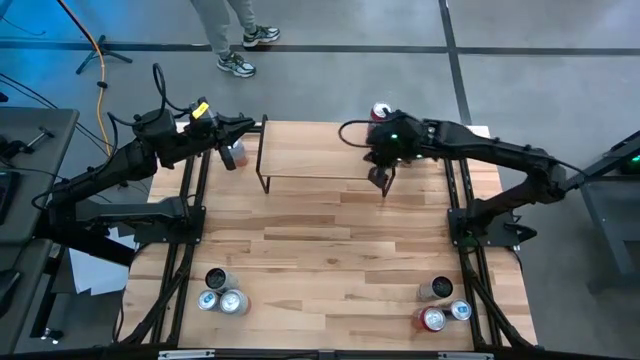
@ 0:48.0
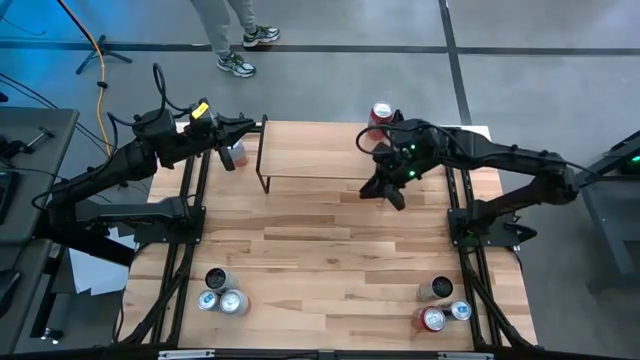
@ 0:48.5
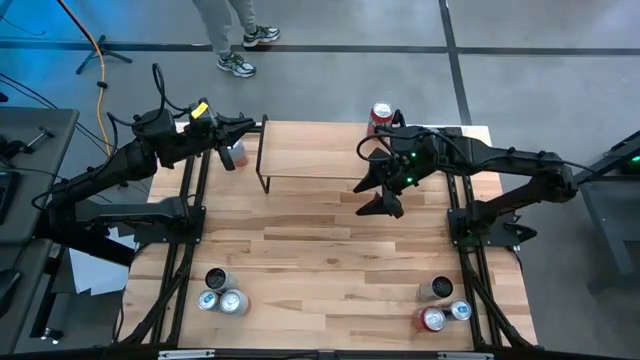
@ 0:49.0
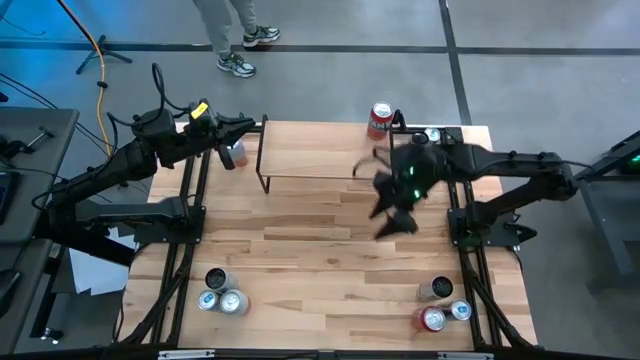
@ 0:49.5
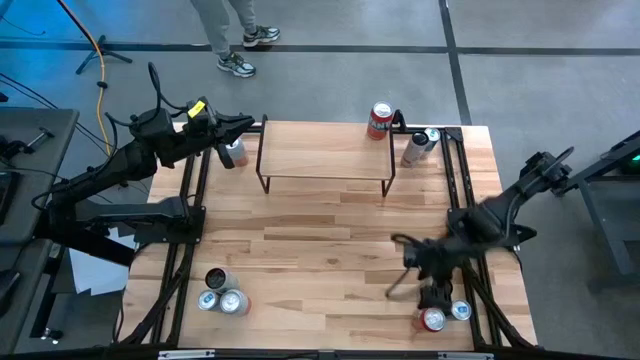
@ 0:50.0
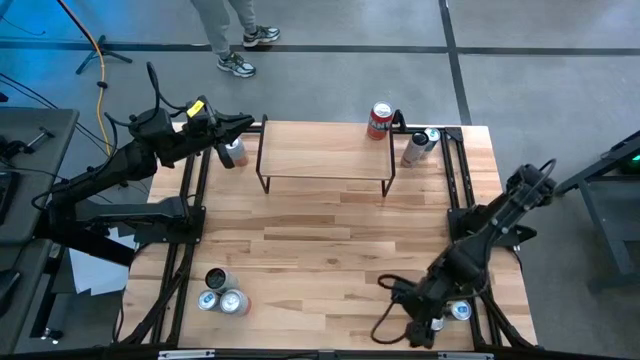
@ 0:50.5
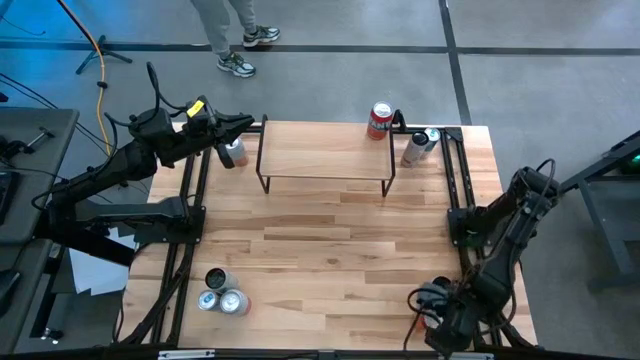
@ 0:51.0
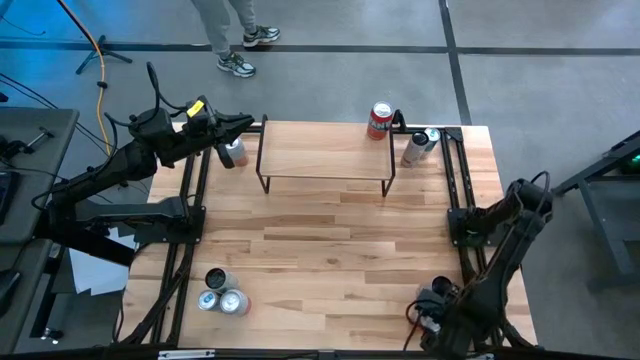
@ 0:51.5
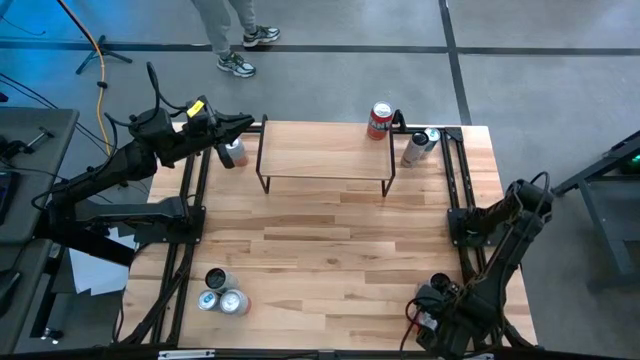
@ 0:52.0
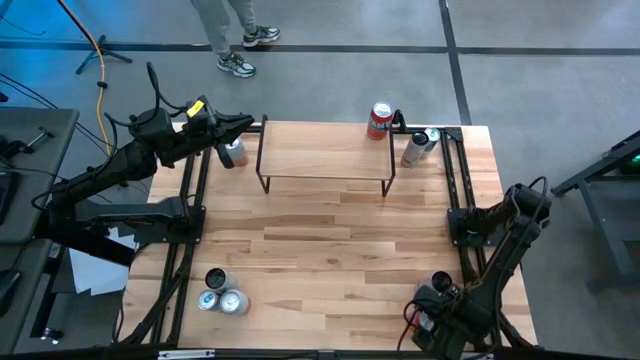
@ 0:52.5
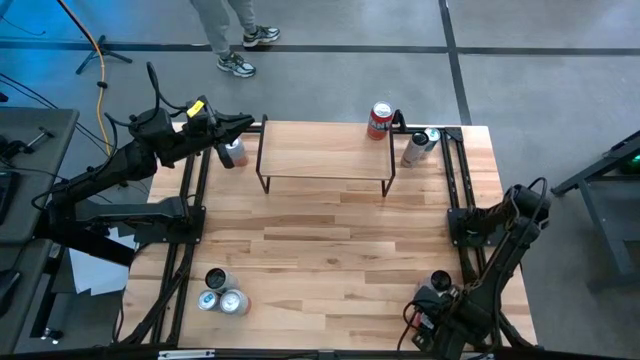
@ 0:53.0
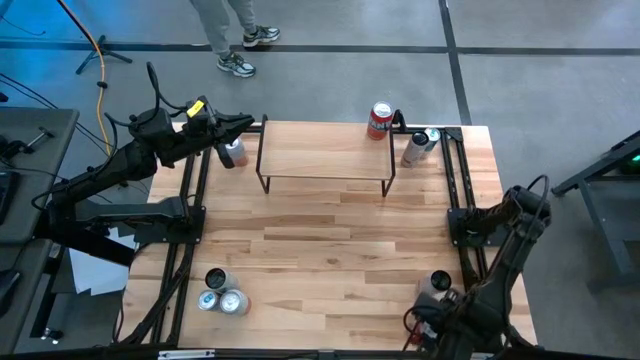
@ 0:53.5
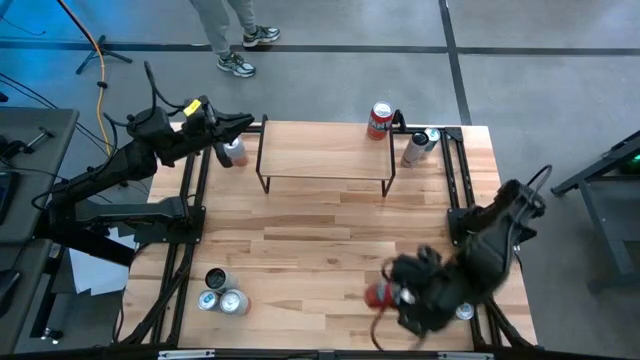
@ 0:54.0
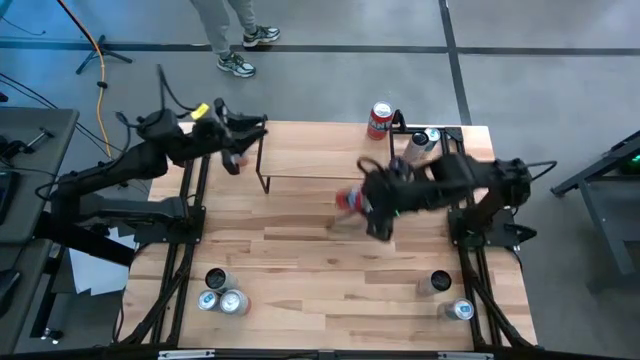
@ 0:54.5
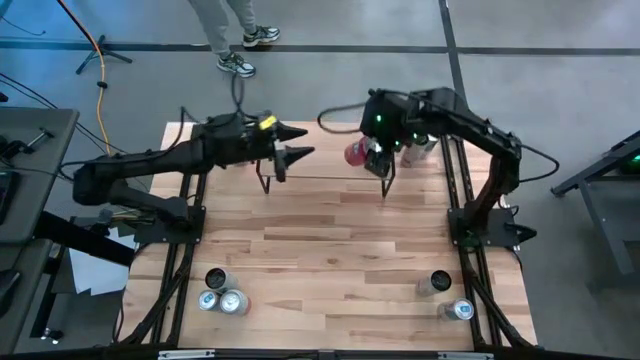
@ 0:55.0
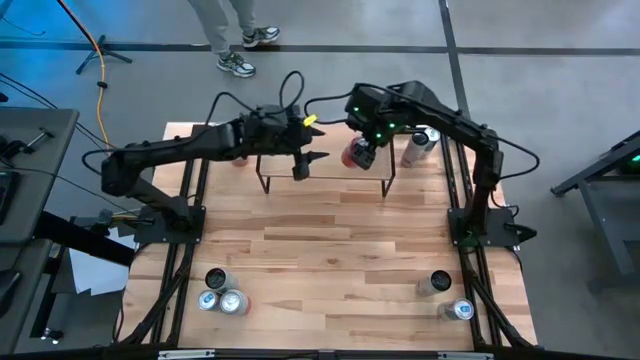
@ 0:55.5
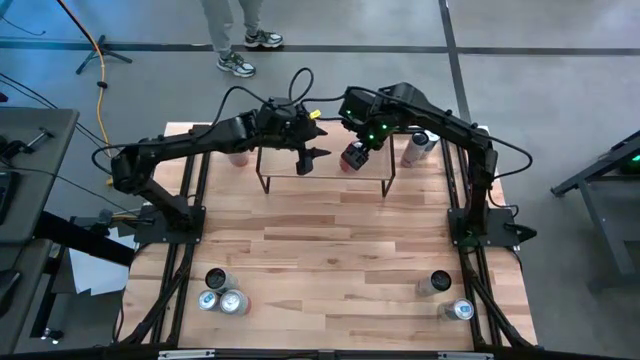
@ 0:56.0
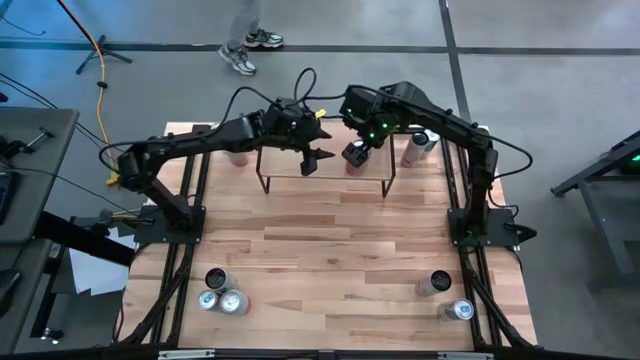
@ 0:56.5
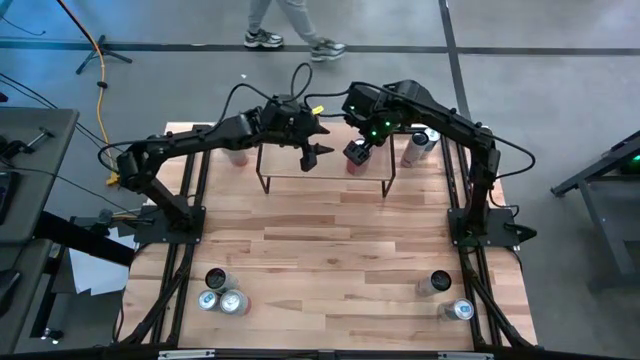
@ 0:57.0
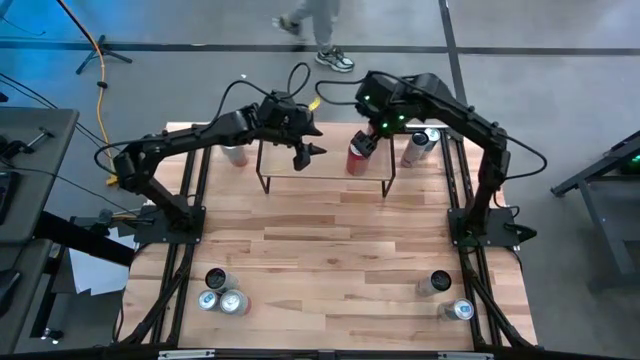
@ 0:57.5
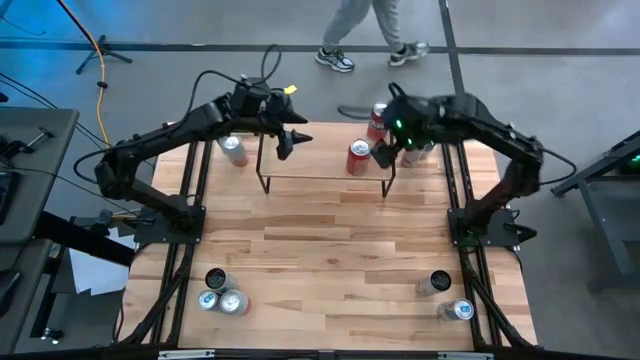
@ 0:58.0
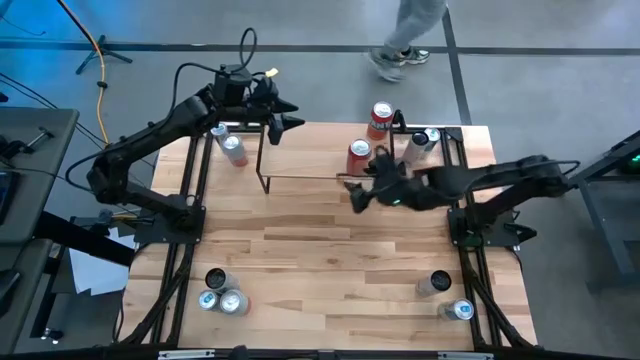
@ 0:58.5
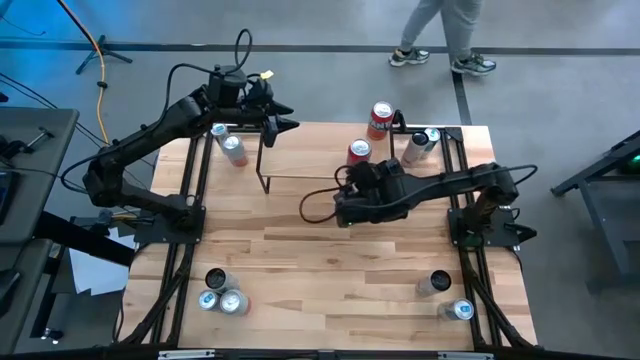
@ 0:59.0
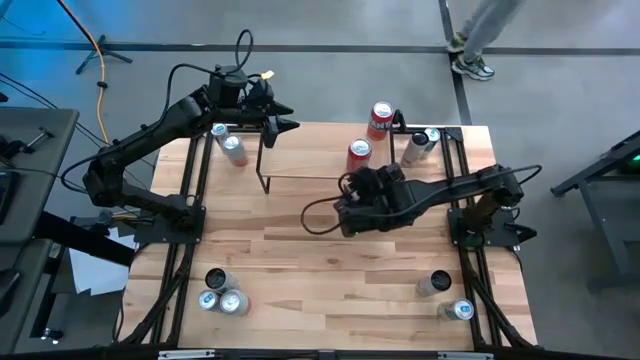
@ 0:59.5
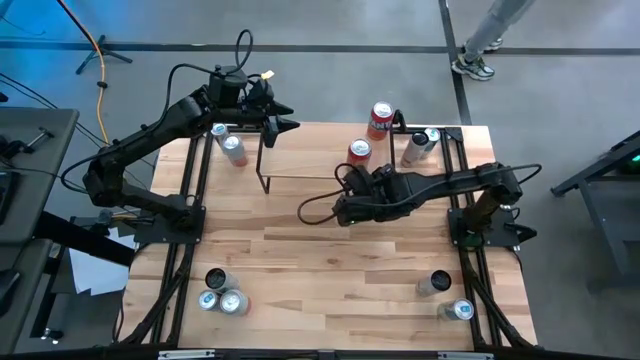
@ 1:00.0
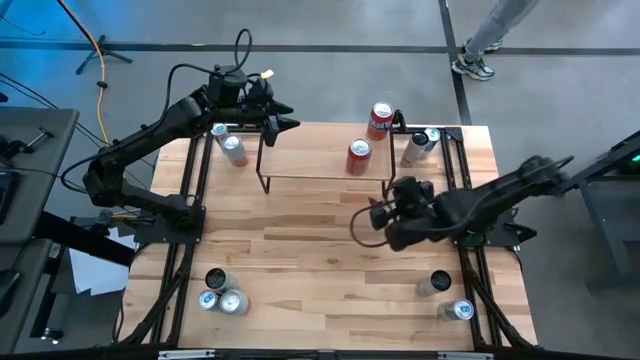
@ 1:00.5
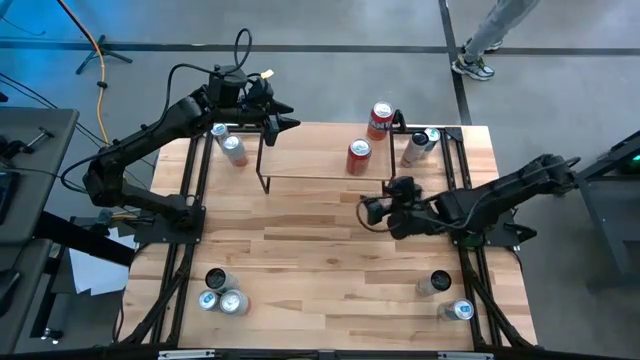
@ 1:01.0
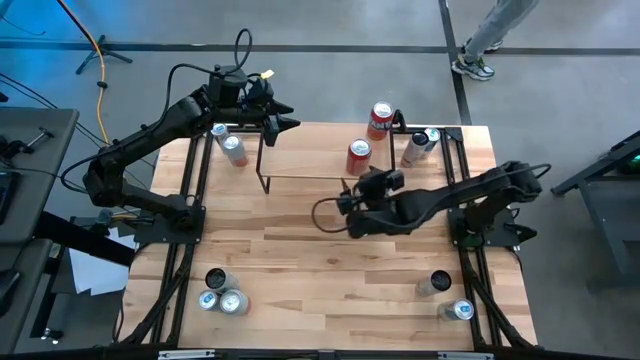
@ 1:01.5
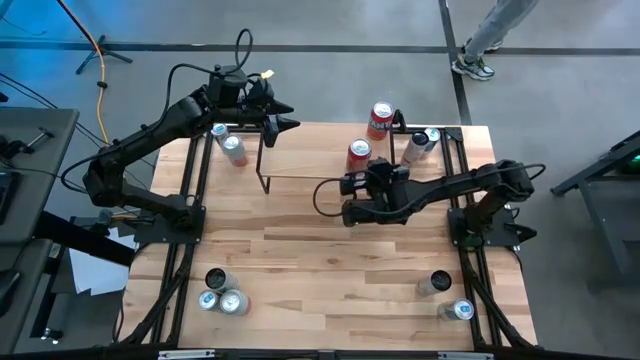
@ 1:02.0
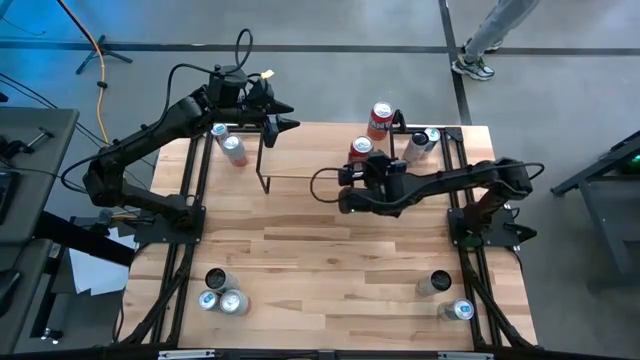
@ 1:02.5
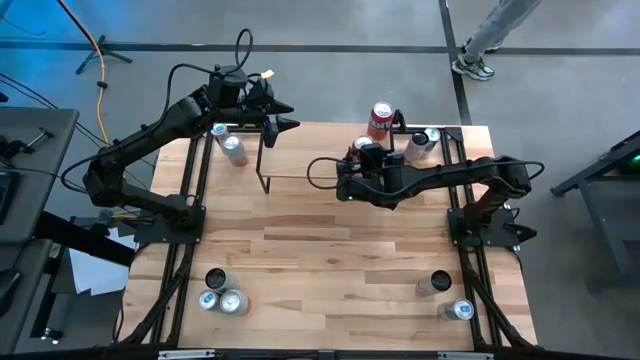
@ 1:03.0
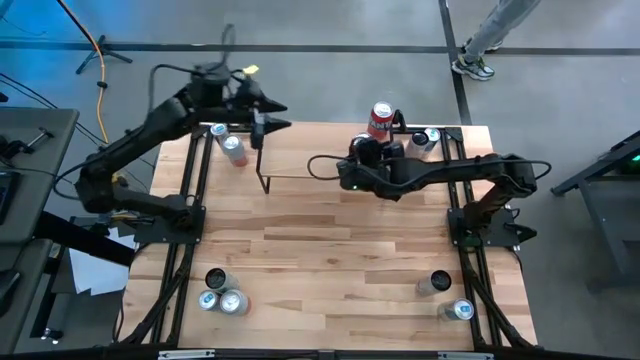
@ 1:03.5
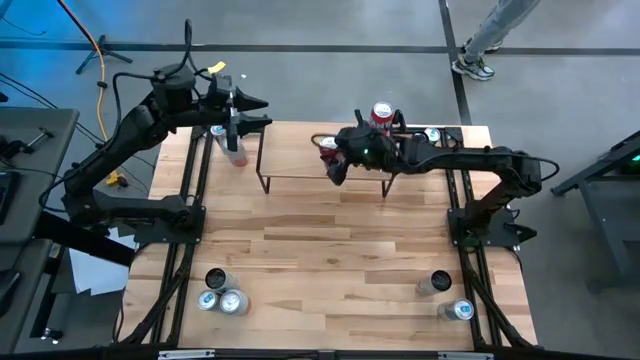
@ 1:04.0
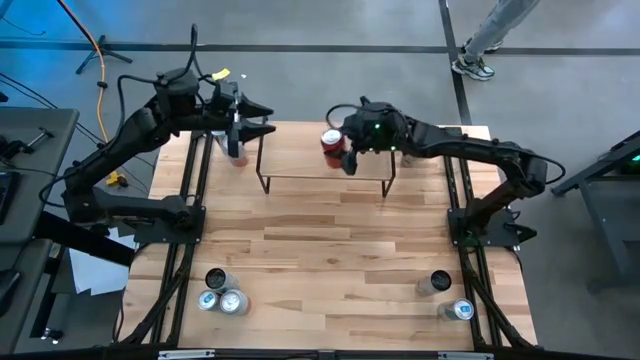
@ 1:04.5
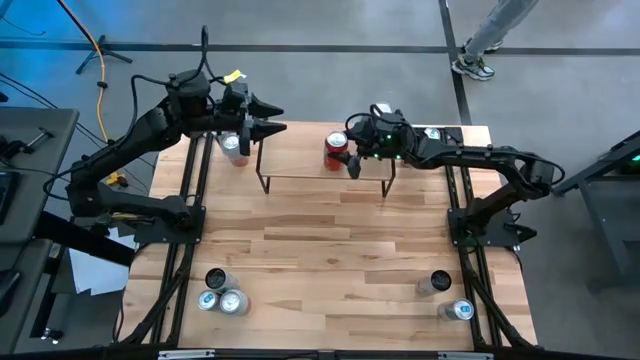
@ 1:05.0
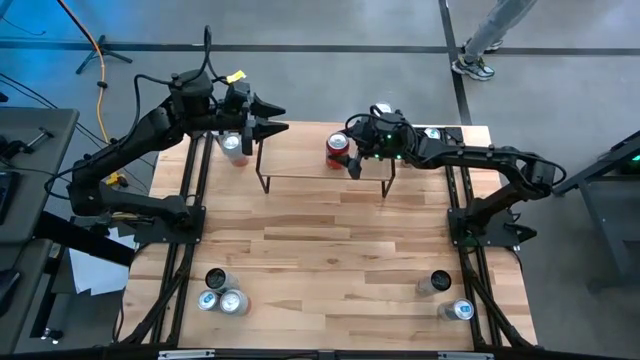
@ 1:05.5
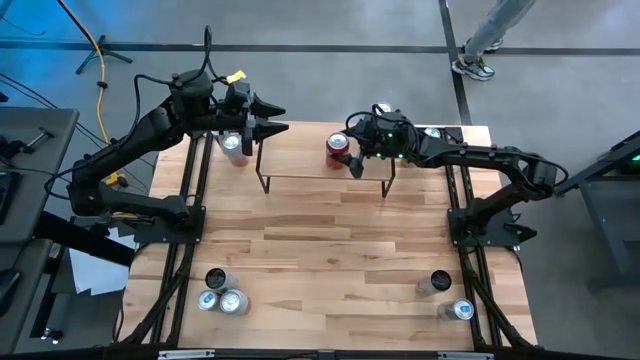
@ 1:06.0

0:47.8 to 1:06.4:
Task: Place canned beverage on shelf
Put the red soda can on the shelf aligned with the red soda can
